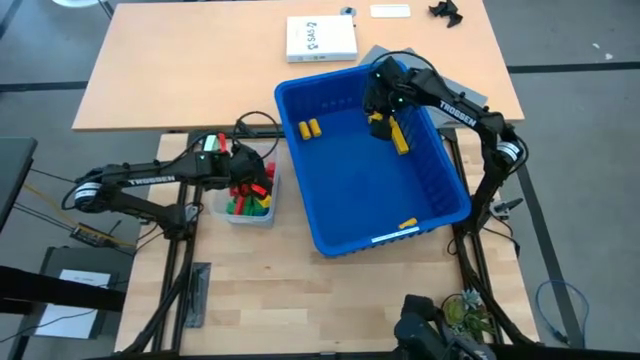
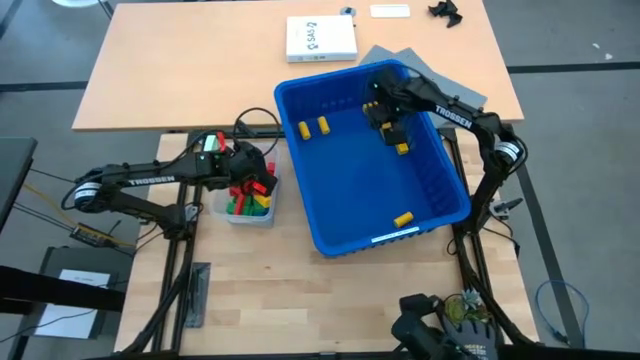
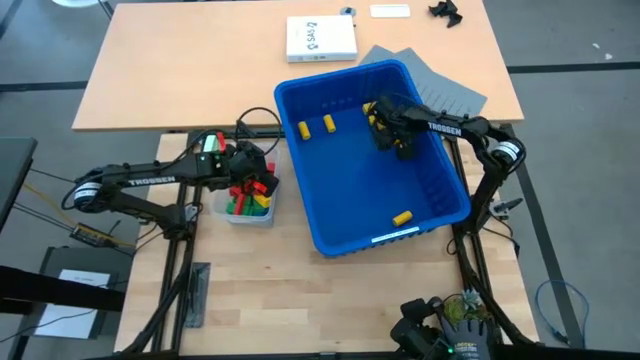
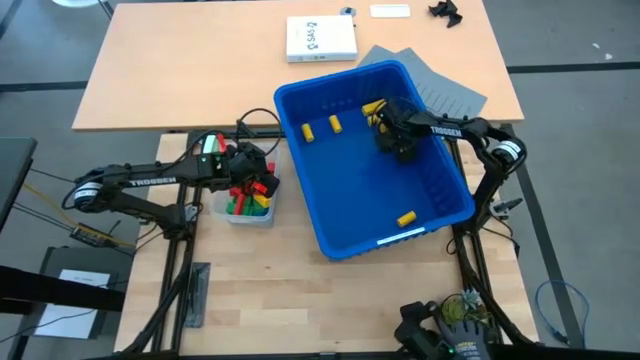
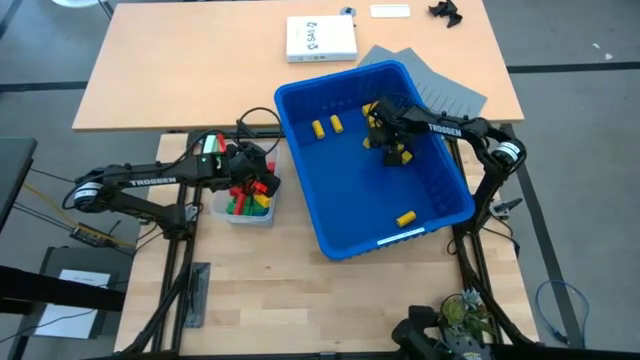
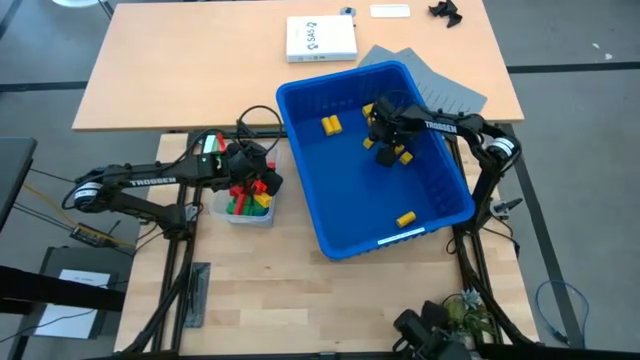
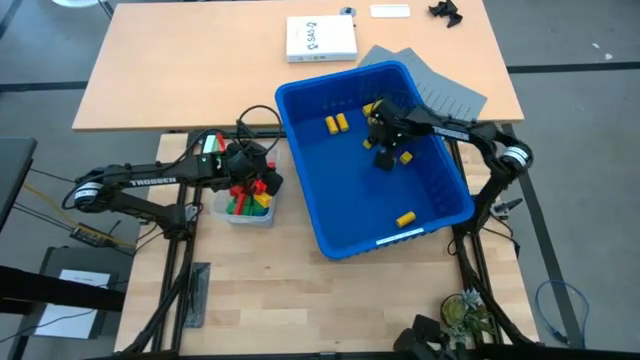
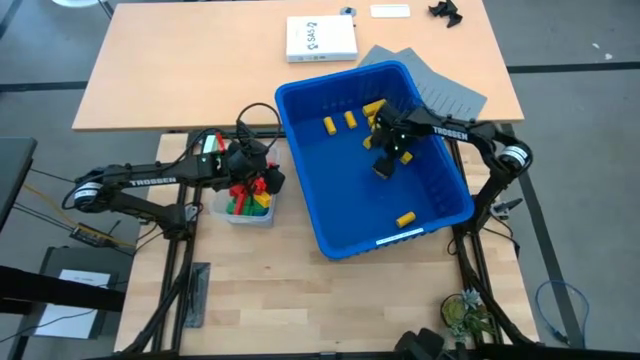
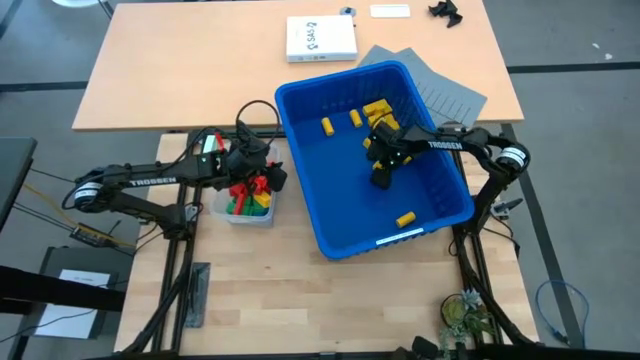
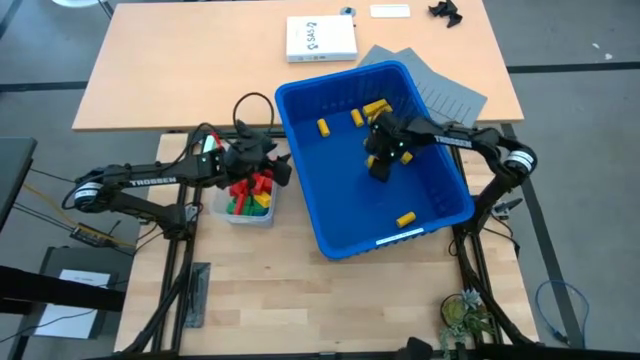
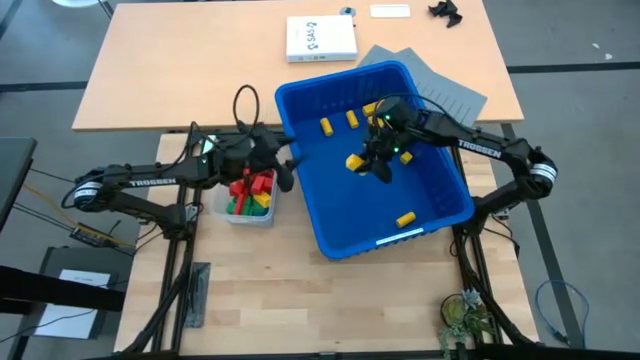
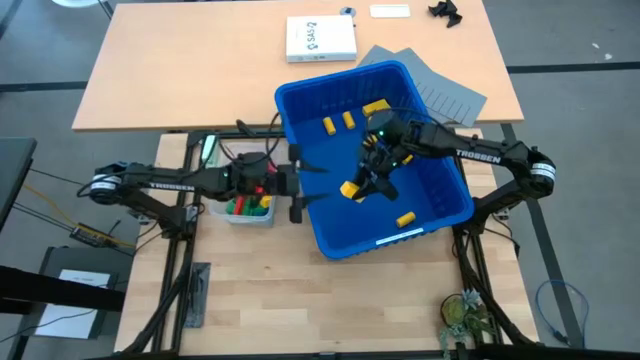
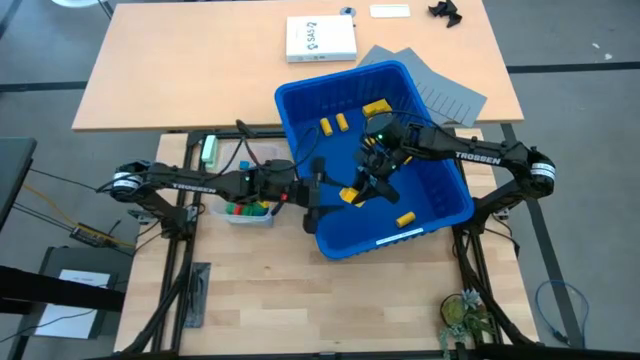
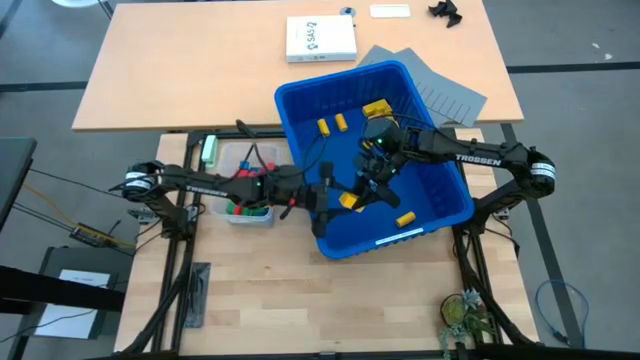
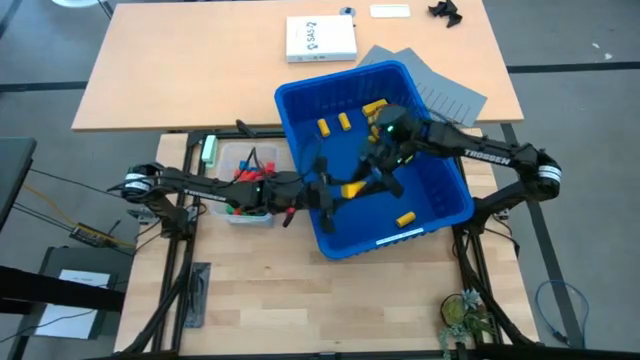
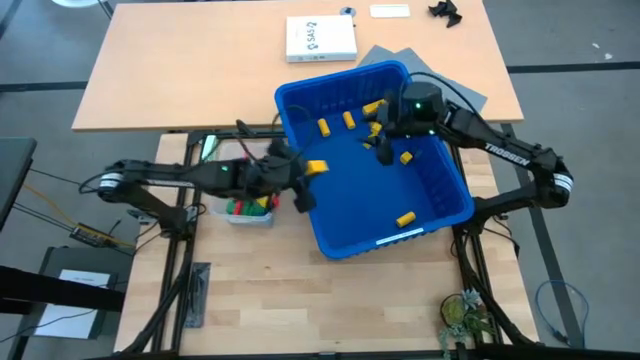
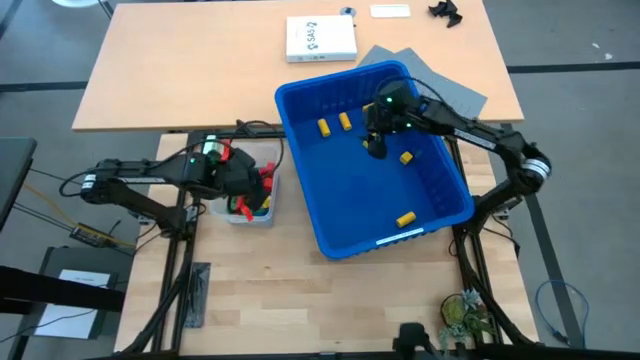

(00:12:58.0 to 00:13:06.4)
Task: Sort blocks
Put the yellow block into the transparent bin

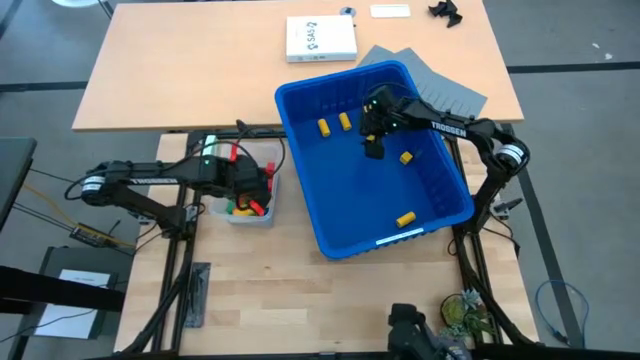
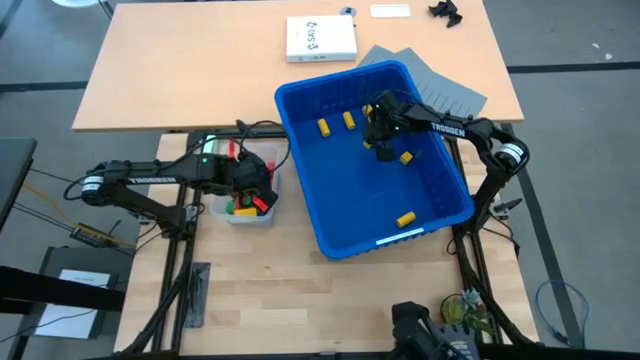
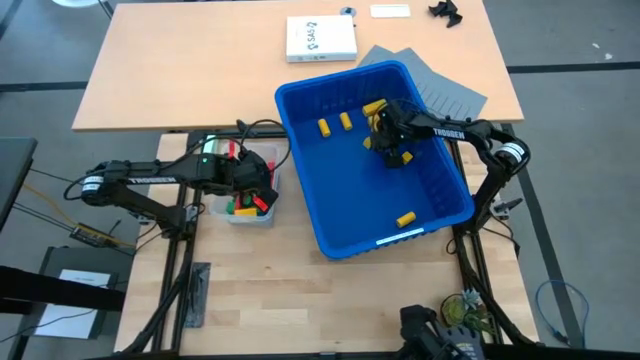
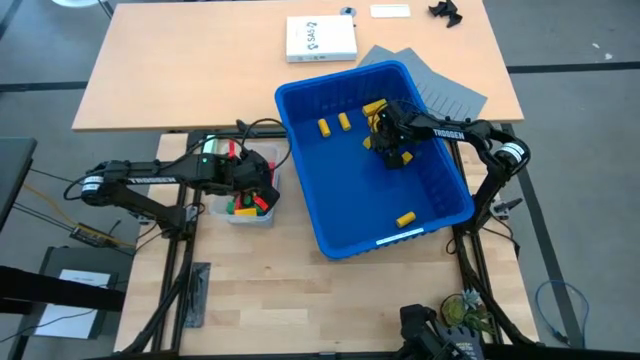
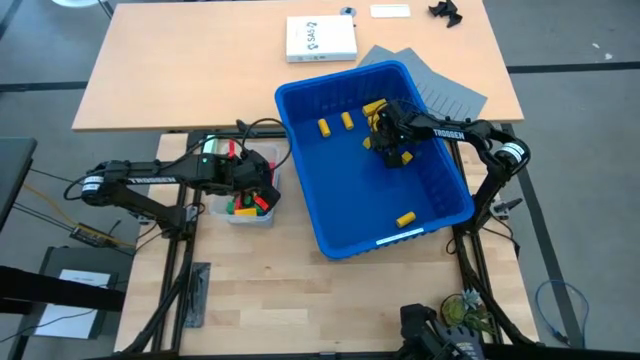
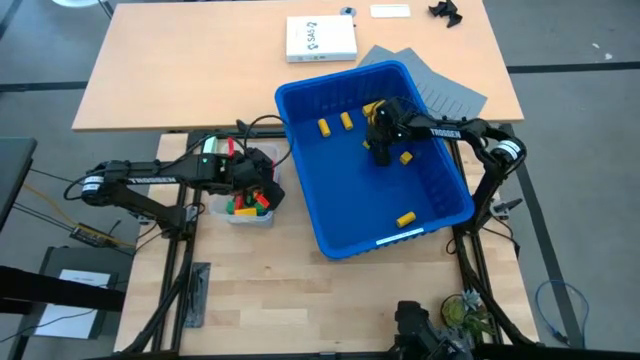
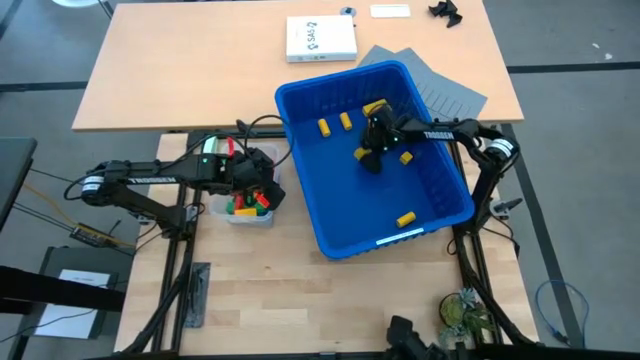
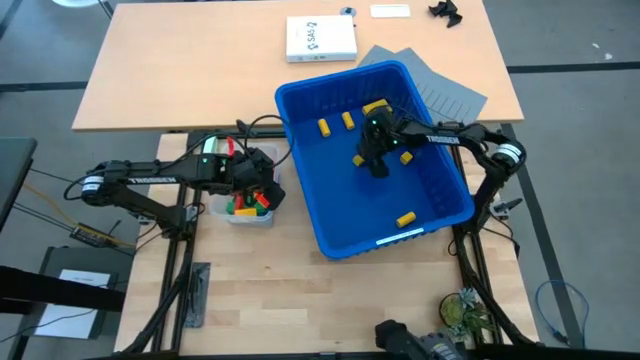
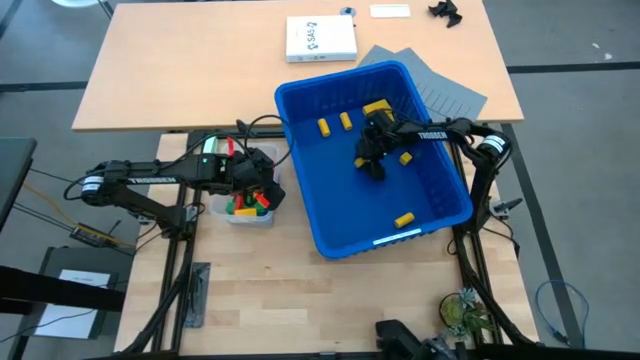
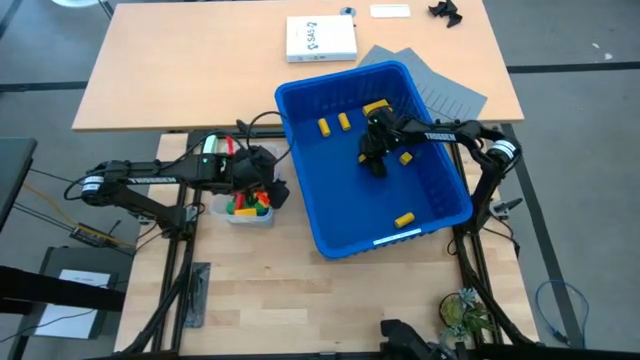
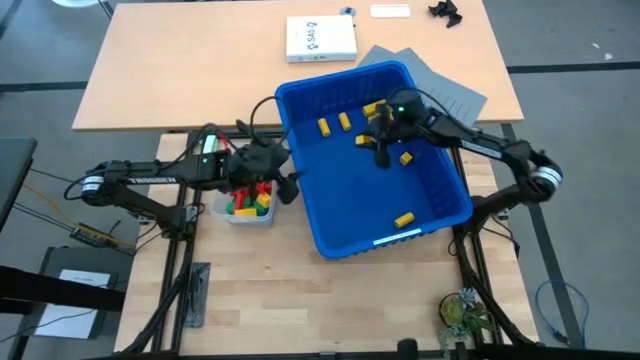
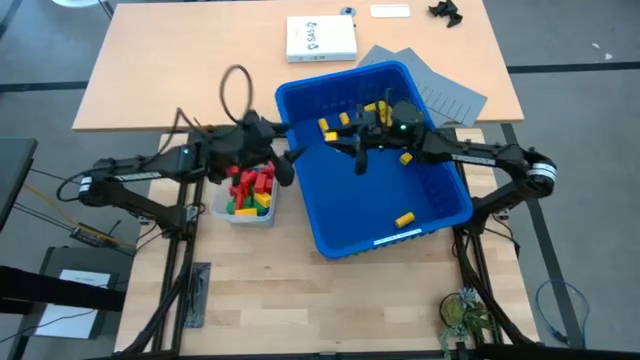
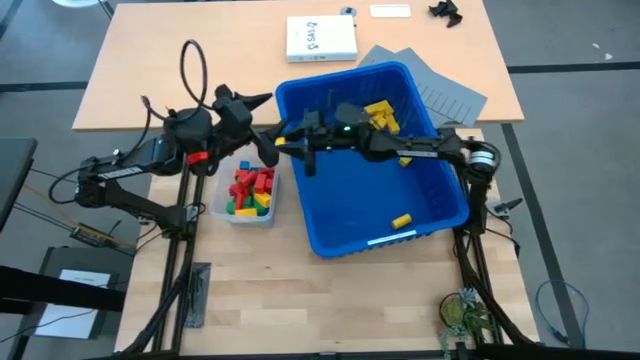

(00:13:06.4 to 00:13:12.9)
Put the yellow block into the transparent bin

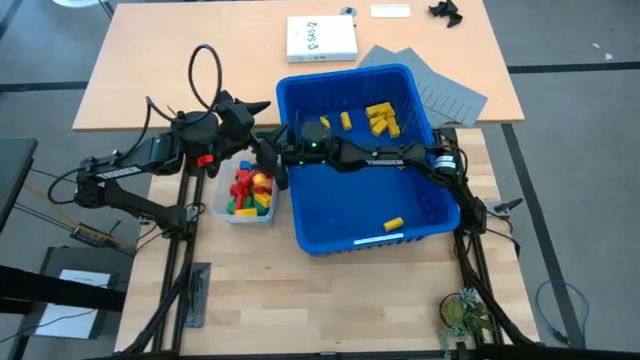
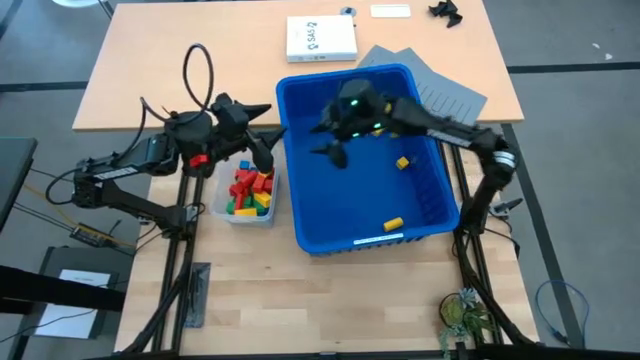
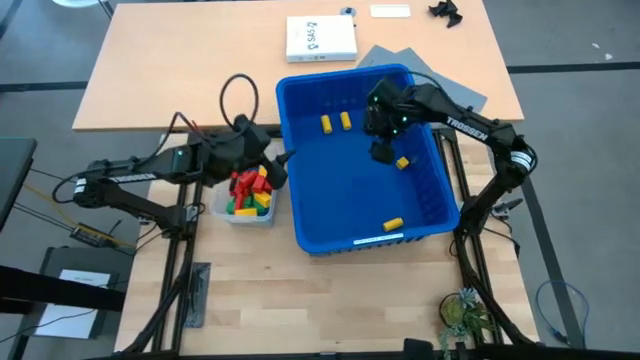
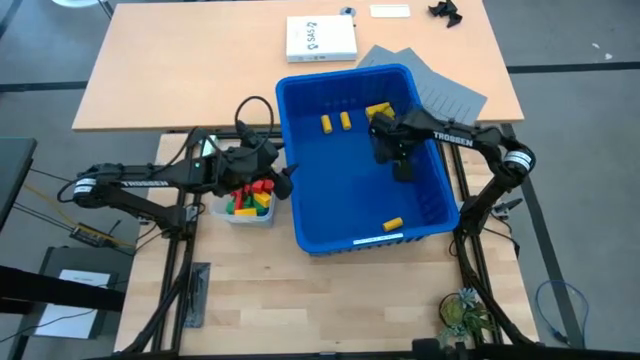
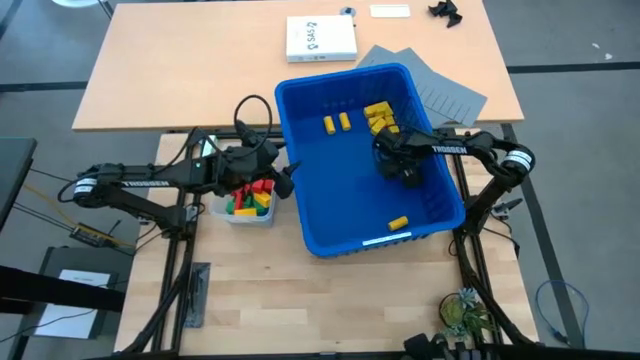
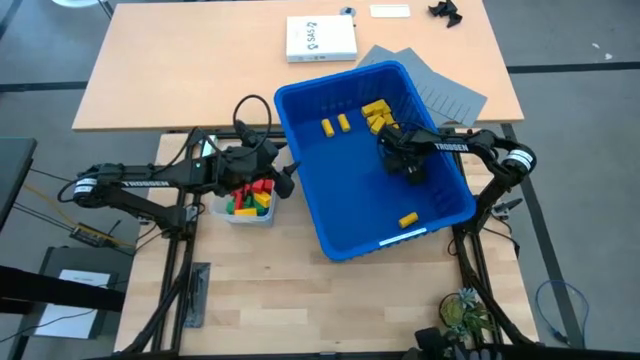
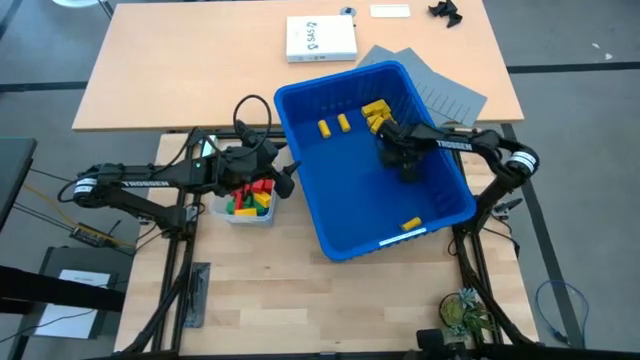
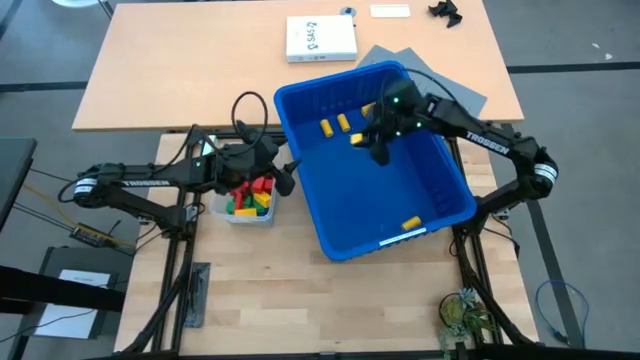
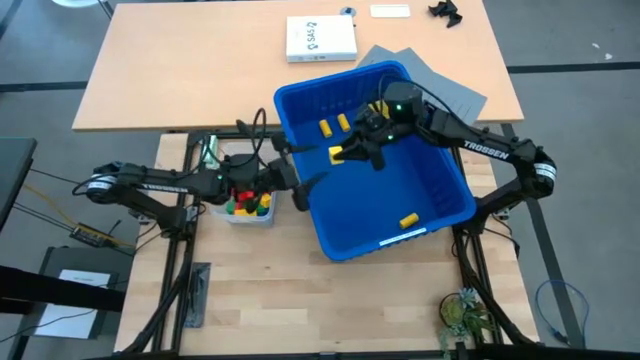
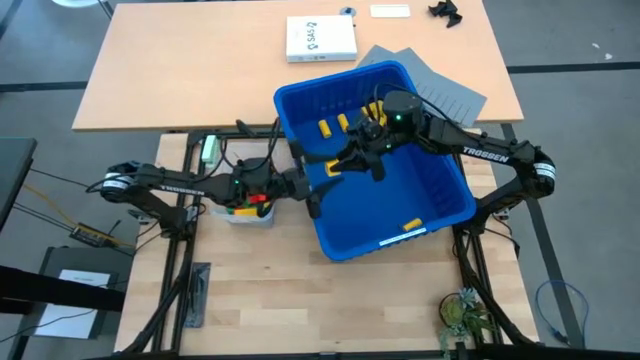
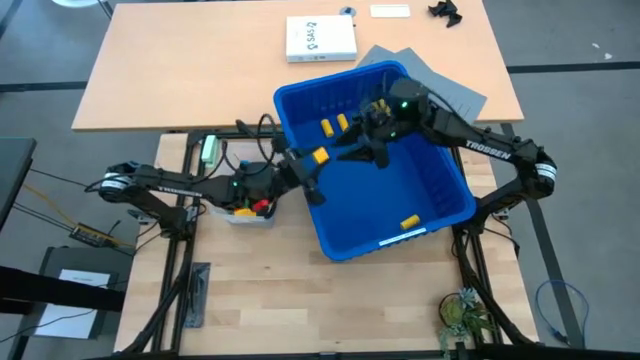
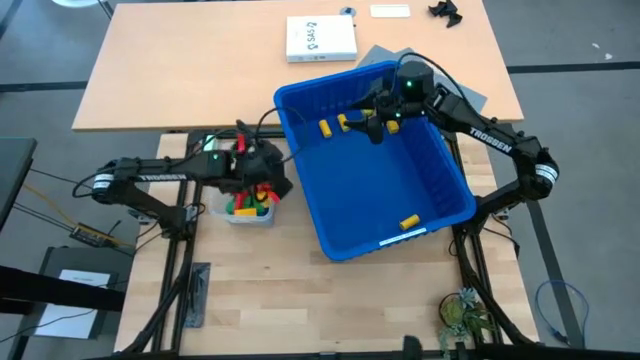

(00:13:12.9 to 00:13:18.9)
Remove the yellow block from the blue bin and place it in the transparent bin
